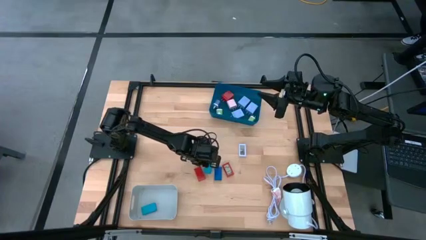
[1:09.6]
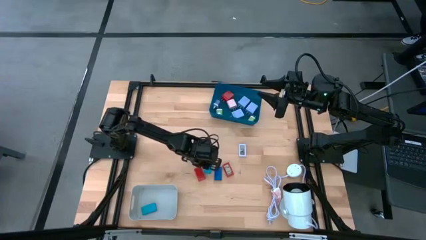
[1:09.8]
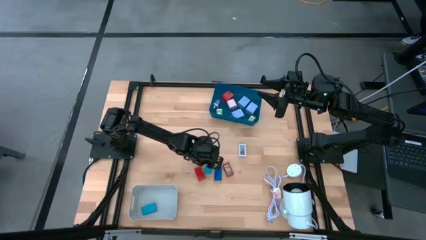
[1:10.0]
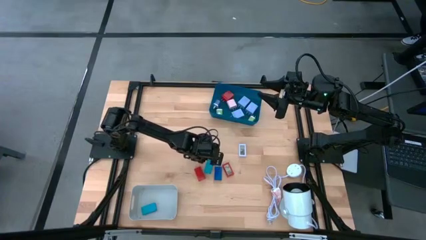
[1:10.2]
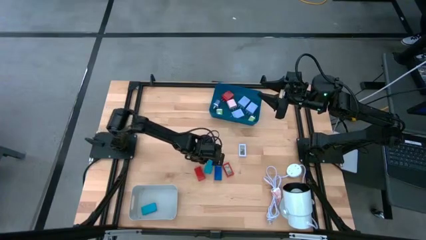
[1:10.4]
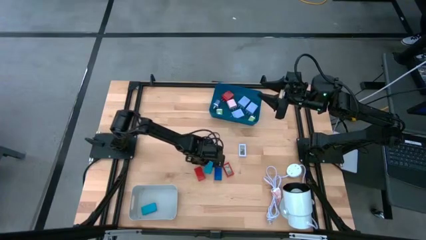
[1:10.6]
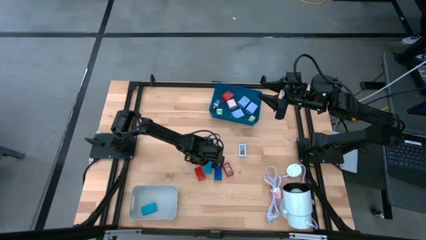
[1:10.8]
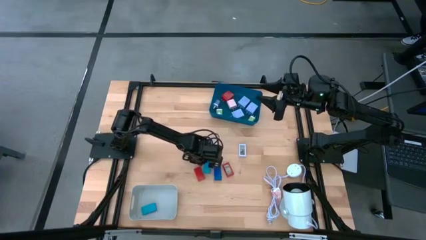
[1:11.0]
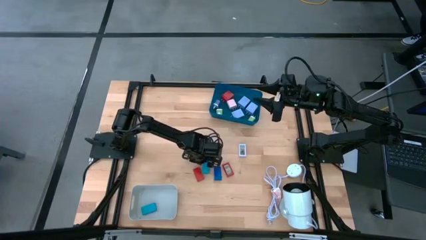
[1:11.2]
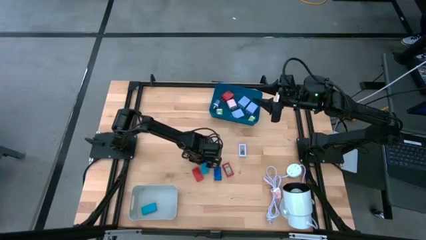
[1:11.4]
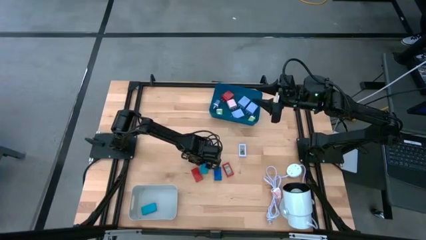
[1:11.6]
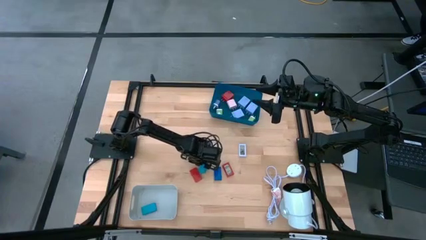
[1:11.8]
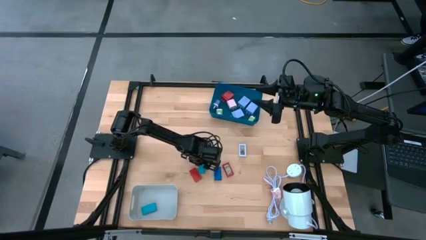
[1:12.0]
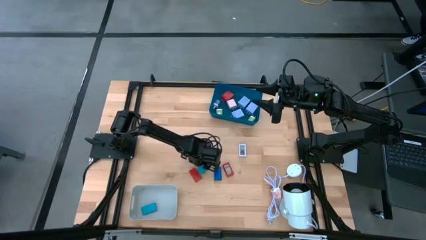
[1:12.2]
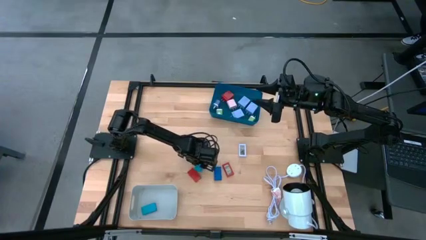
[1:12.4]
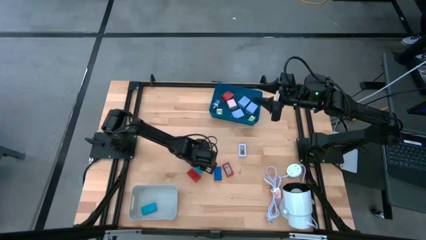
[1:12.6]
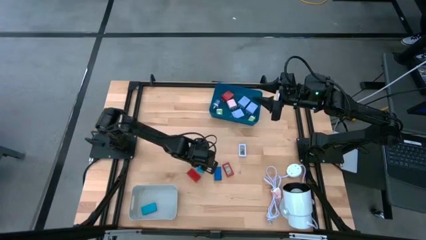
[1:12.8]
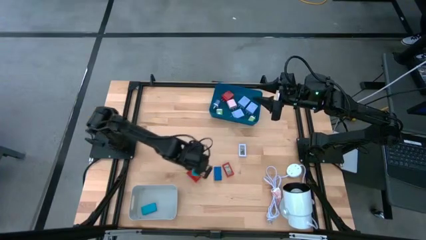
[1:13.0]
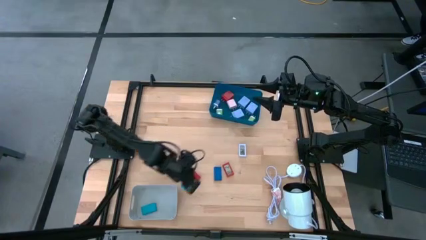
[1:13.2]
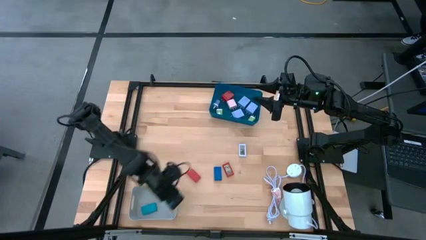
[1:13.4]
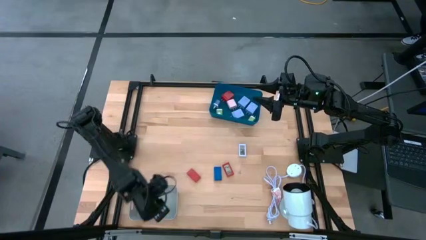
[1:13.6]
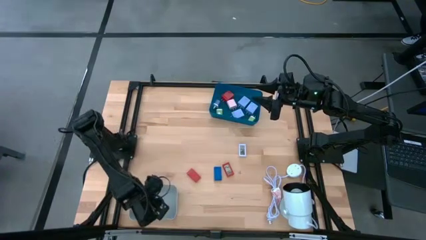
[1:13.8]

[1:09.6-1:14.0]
Task: Pick & Place Office items
Put the light blue digital timer into the white bin

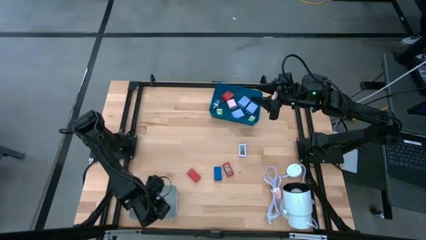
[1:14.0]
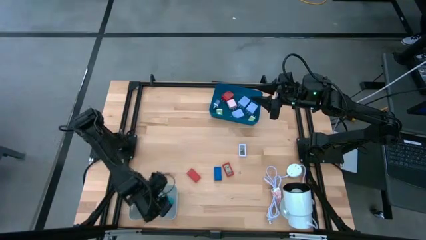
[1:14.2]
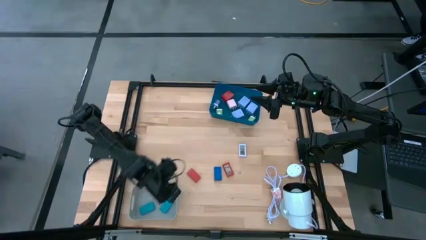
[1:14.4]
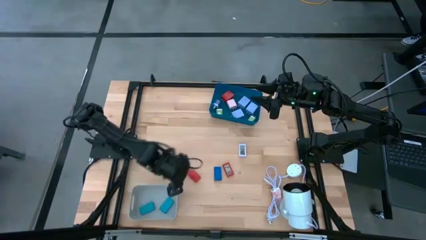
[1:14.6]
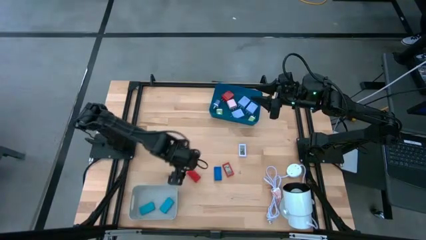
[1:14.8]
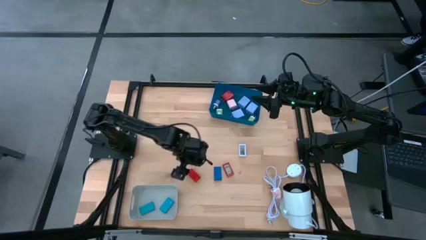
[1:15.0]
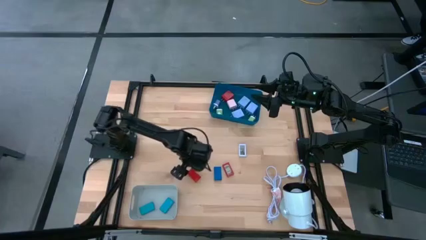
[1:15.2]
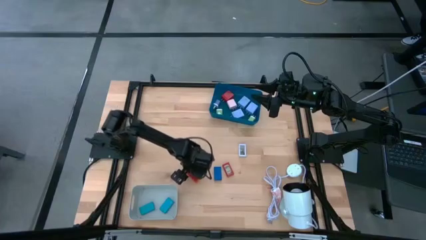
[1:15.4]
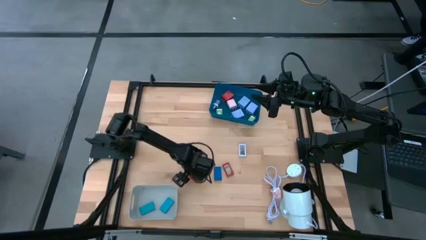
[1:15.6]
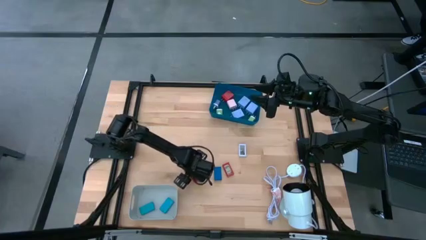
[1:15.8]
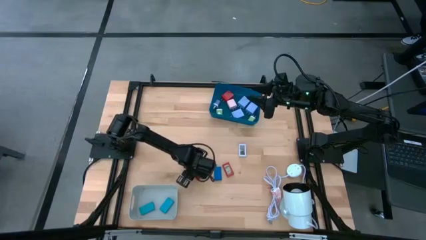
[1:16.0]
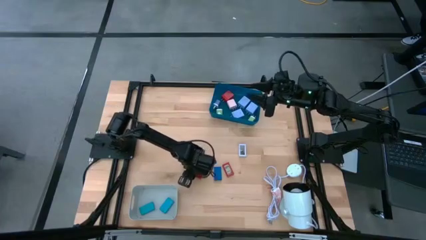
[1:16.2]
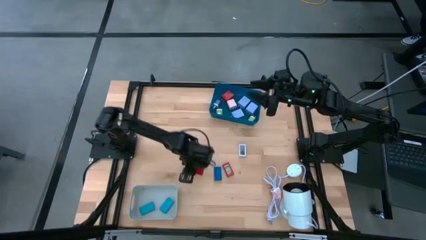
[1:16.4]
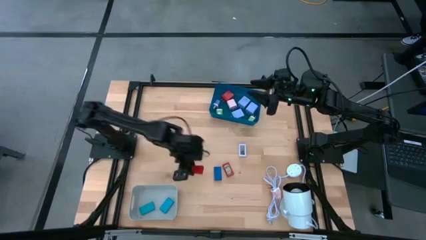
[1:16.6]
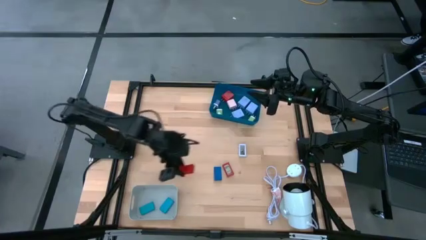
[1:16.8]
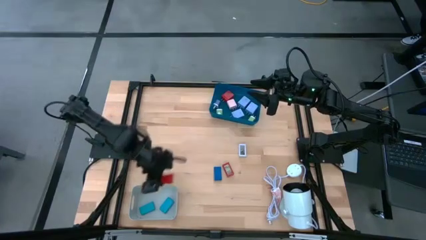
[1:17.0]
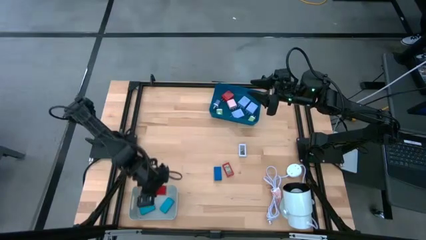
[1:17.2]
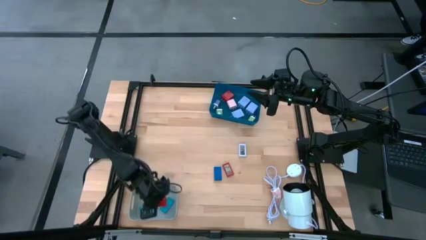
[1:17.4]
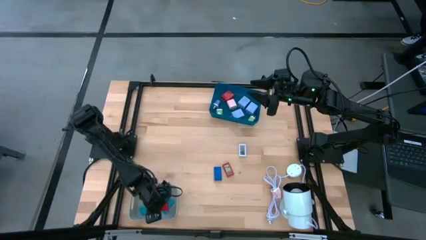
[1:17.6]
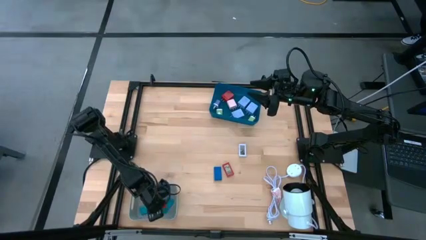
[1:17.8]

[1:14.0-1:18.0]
Put the left red digital timer into the white bin

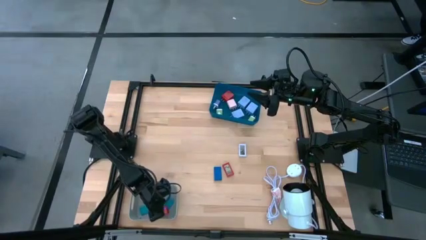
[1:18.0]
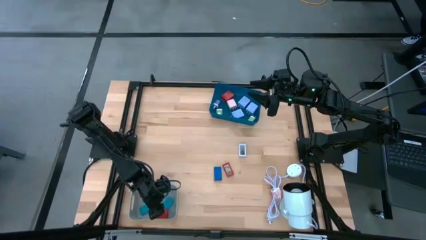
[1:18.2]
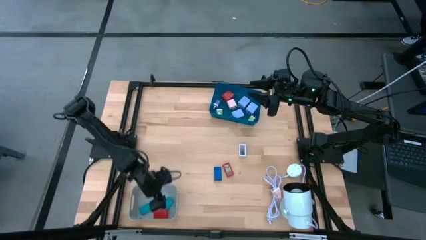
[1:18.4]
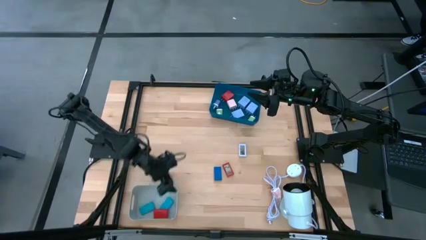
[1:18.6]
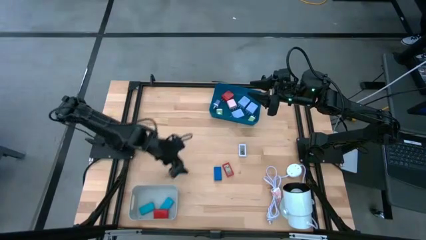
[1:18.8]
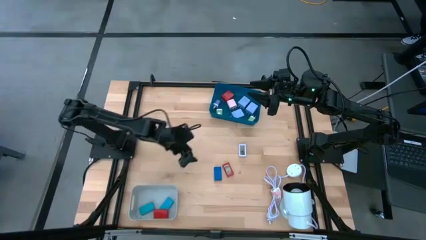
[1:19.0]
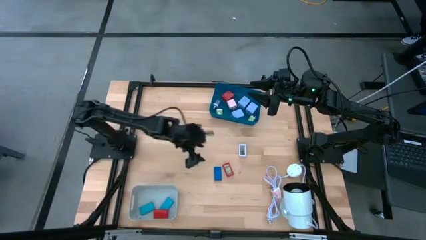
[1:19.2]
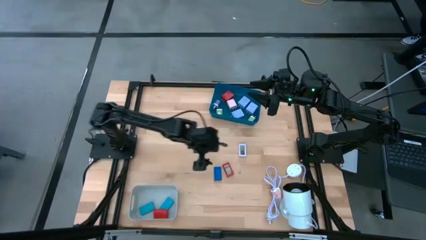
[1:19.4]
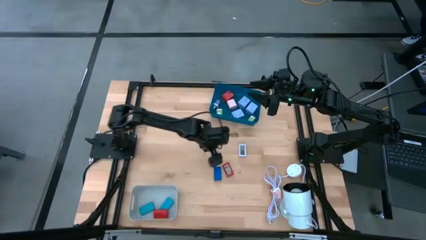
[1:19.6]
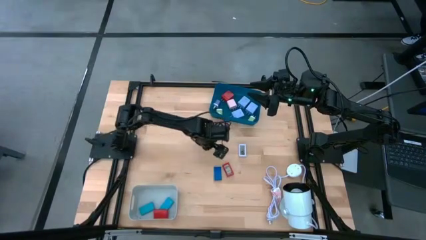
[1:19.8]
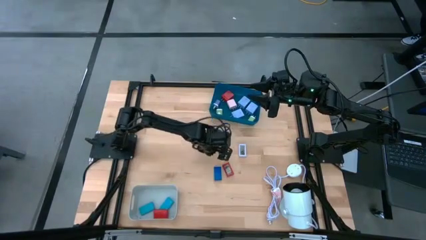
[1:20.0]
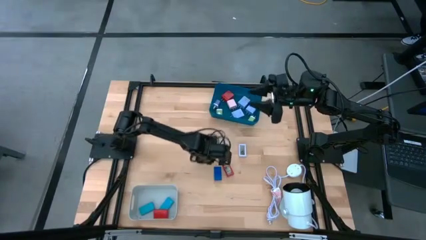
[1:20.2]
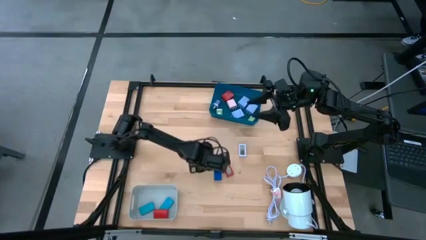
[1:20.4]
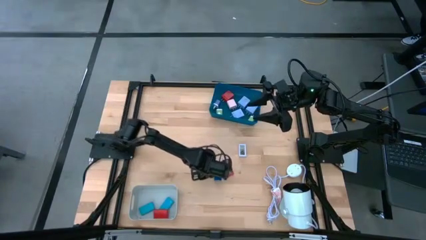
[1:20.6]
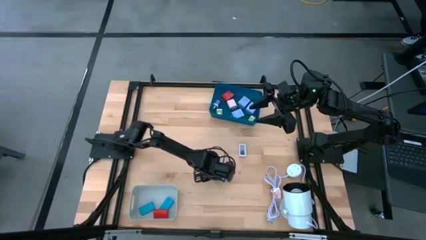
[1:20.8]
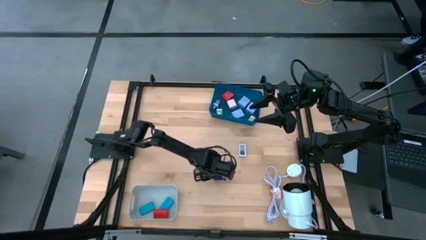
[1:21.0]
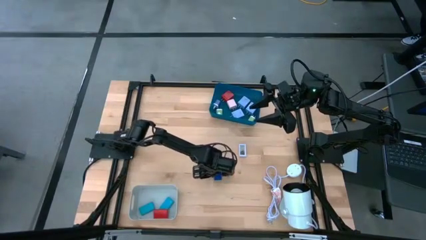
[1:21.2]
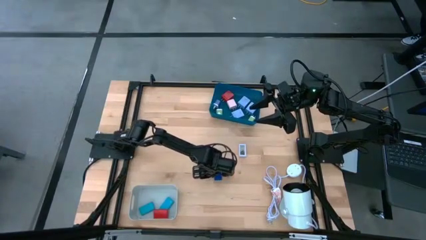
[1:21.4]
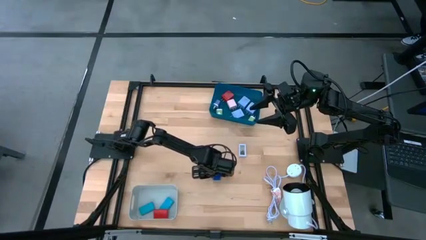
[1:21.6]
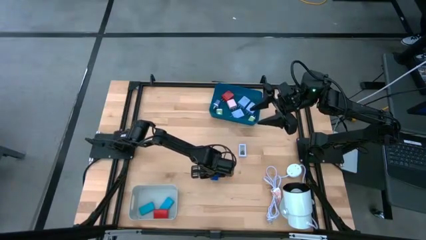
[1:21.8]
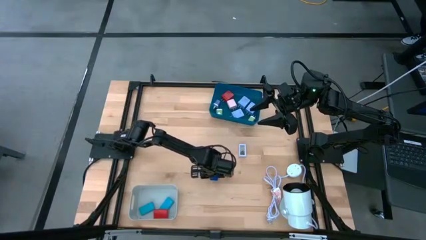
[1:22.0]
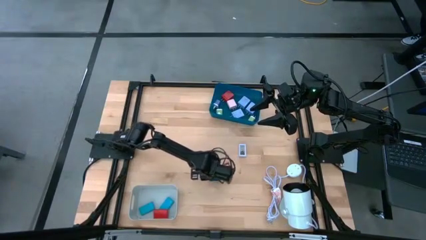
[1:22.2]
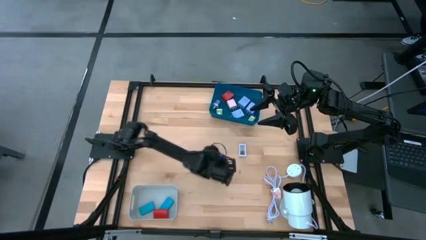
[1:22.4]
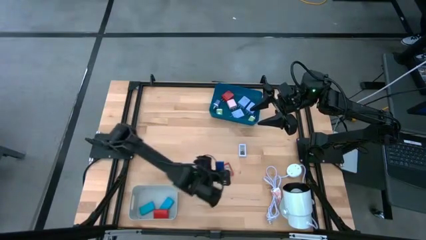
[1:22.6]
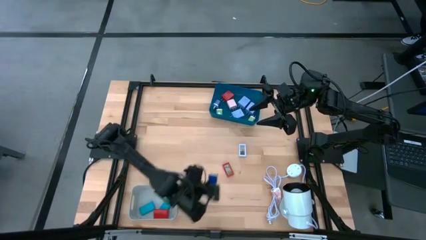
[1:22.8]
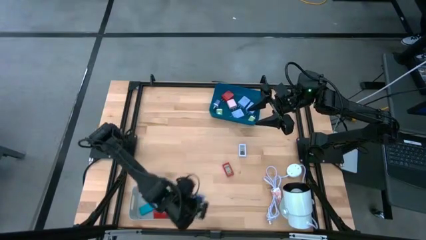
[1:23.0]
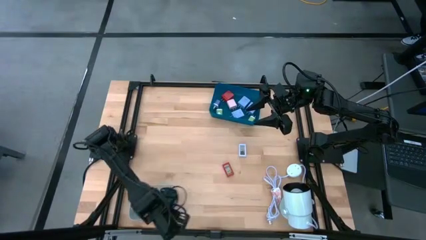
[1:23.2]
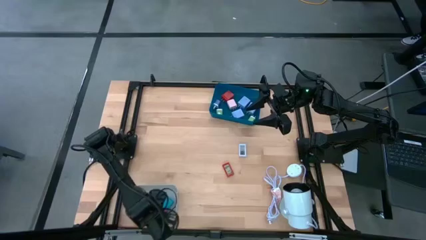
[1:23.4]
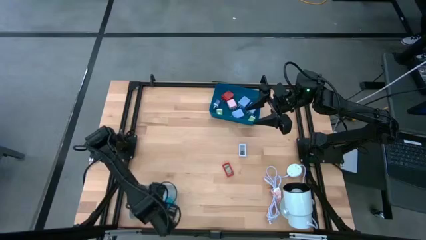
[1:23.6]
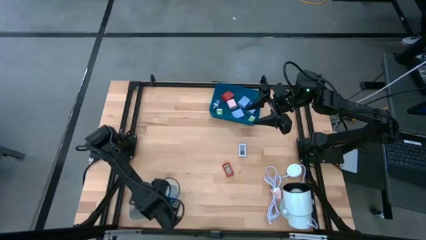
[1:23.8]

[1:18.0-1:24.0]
Put the blue digital timer into the white bin

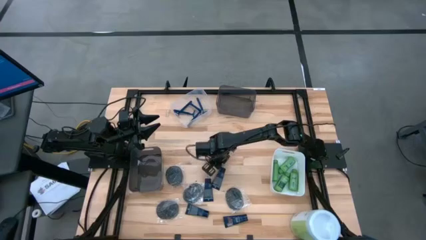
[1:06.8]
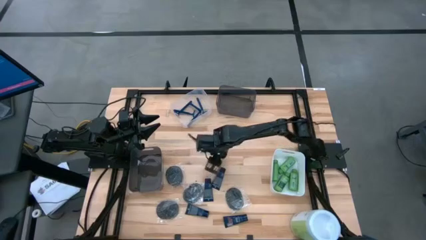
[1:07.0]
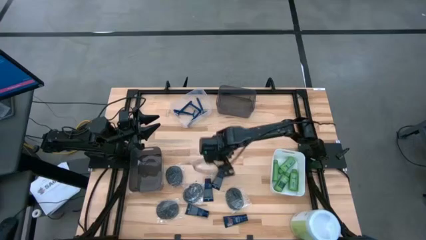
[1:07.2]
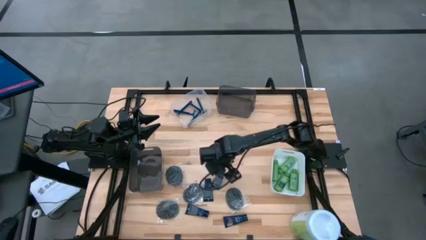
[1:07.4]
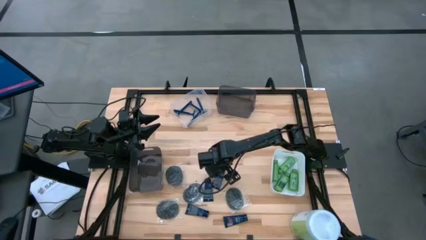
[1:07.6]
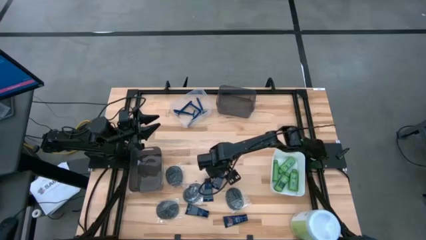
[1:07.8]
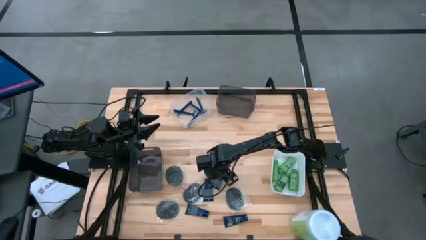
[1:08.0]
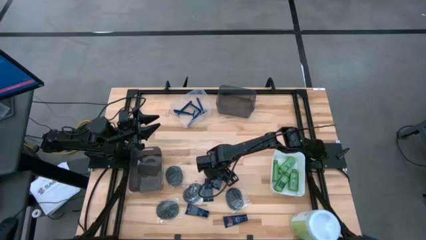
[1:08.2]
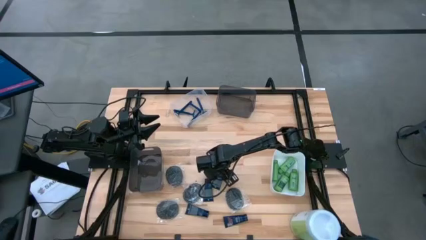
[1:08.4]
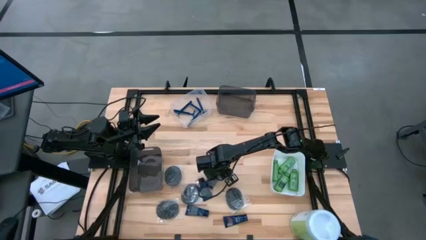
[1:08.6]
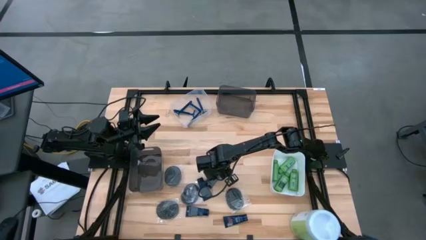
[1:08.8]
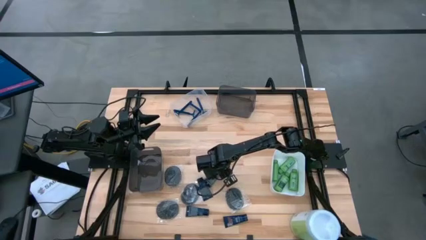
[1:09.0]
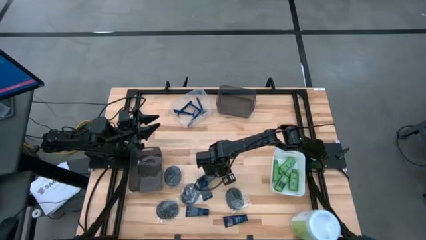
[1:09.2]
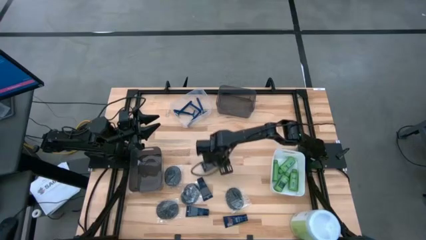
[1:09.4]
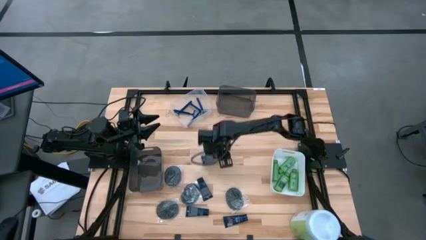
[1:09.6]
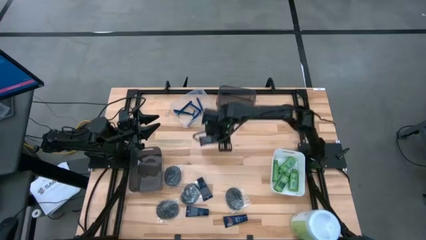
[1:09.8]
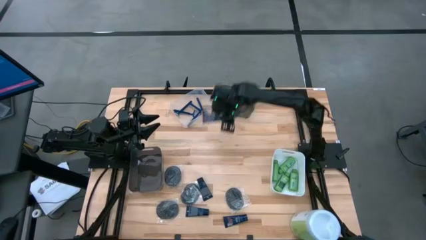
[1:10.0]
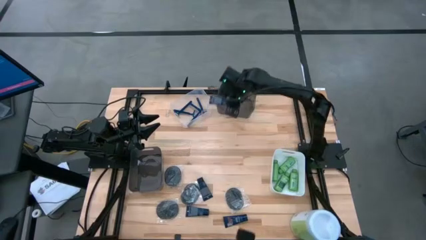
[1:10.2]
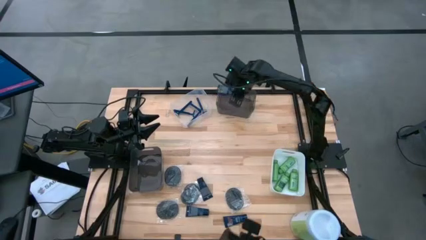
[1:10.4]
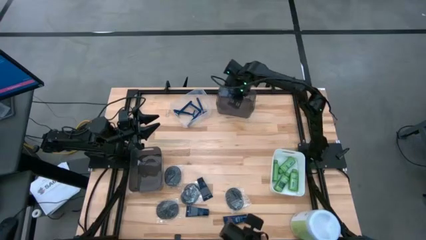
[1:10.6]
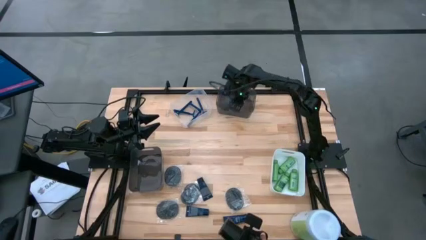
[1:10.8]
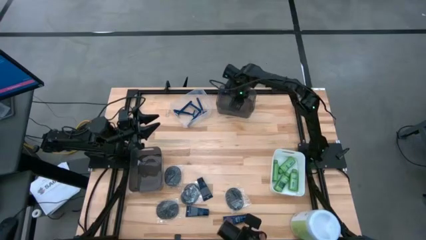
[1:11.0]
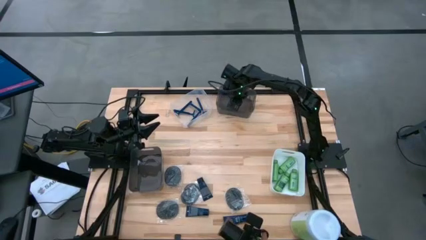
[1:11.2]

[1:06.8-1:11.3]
Task: Pick & Place Travel size toiletries
Put the blue shave cream into the top black bin
